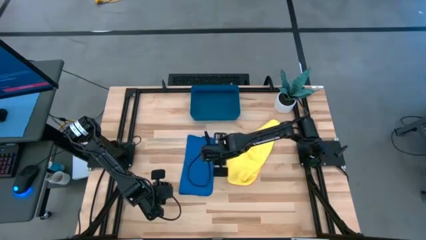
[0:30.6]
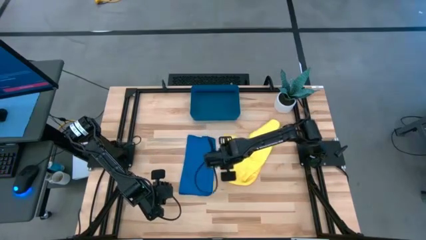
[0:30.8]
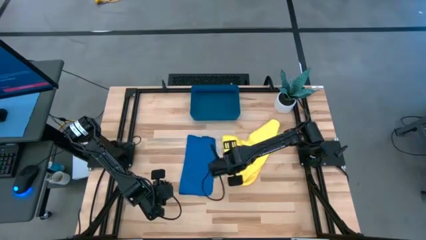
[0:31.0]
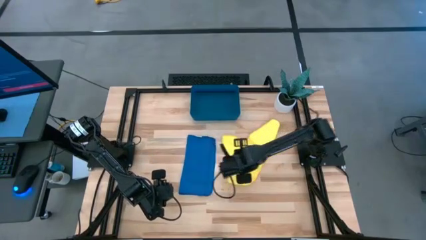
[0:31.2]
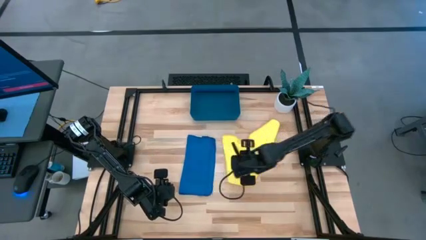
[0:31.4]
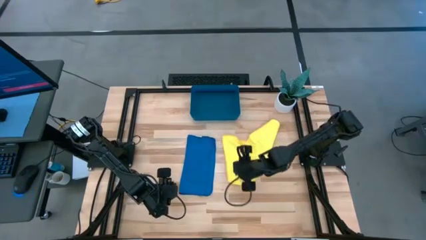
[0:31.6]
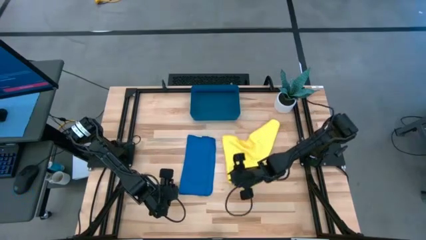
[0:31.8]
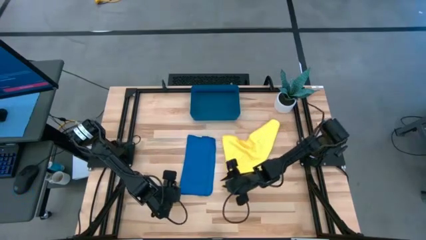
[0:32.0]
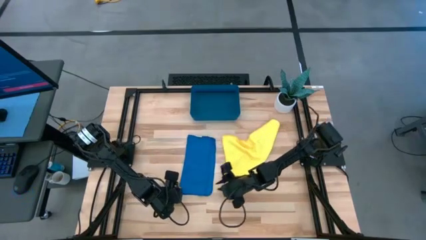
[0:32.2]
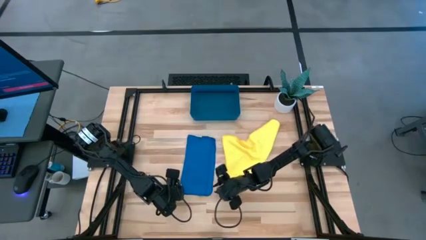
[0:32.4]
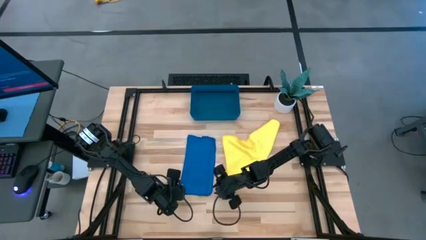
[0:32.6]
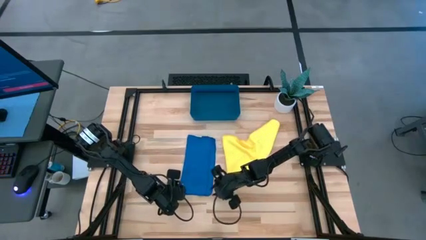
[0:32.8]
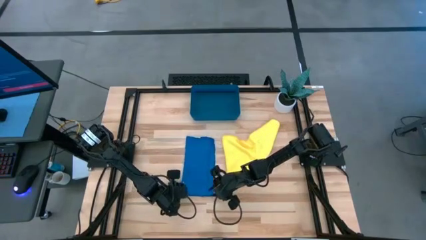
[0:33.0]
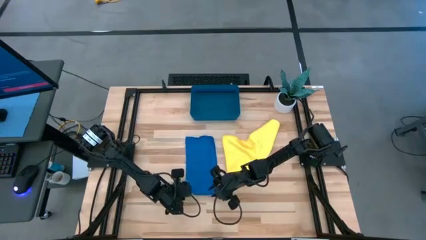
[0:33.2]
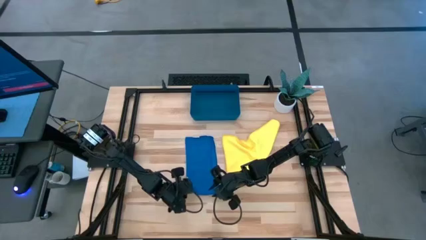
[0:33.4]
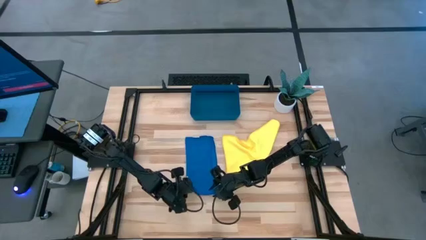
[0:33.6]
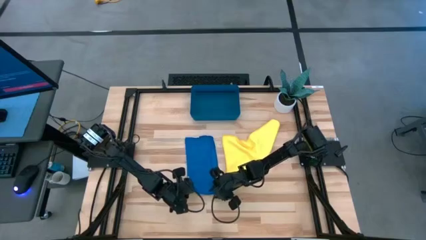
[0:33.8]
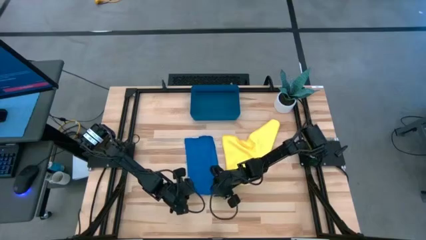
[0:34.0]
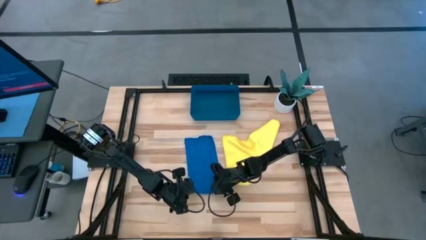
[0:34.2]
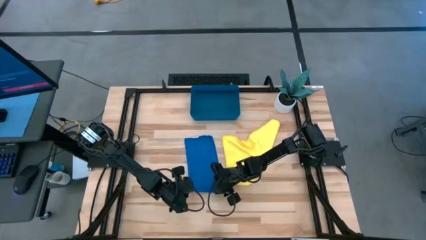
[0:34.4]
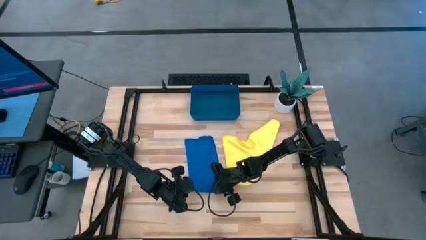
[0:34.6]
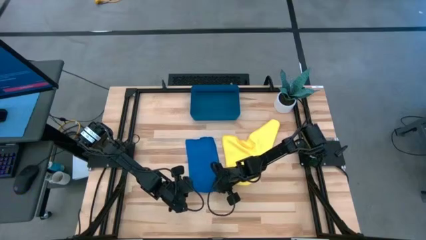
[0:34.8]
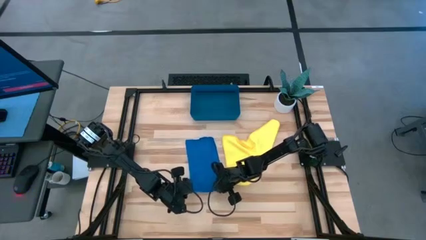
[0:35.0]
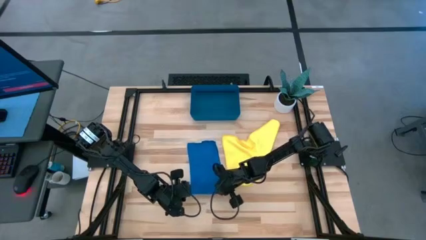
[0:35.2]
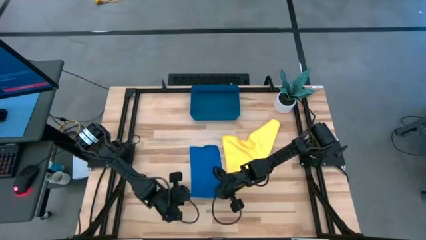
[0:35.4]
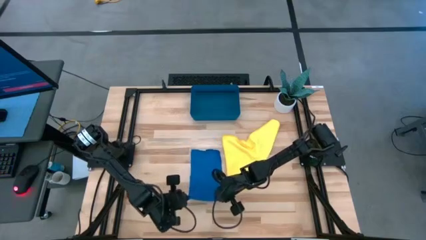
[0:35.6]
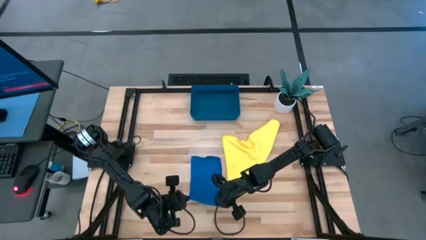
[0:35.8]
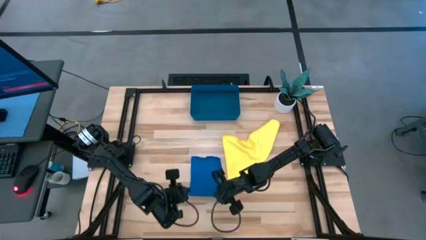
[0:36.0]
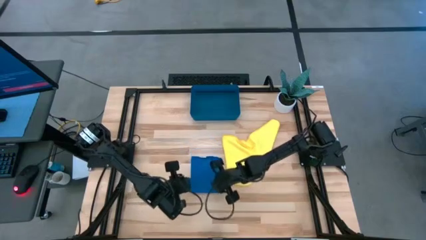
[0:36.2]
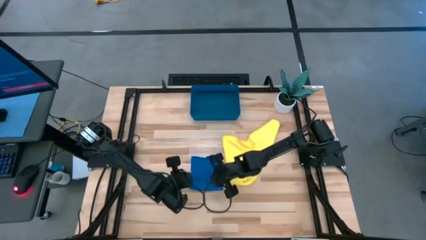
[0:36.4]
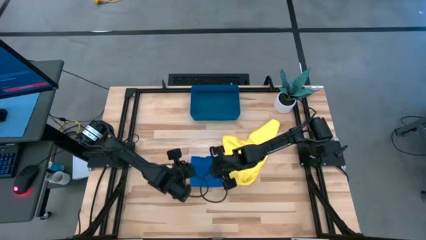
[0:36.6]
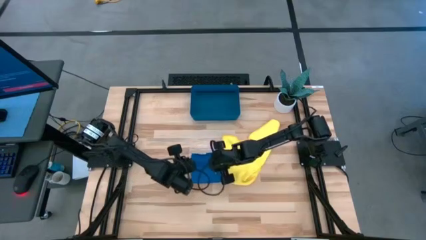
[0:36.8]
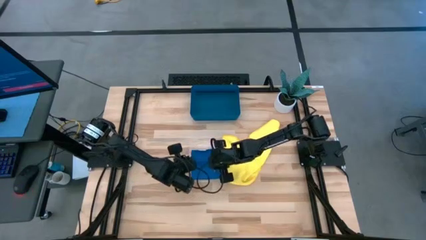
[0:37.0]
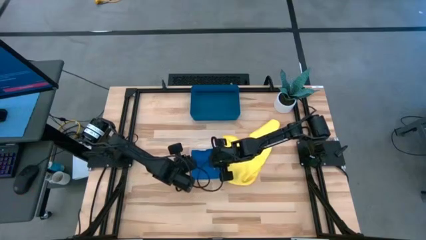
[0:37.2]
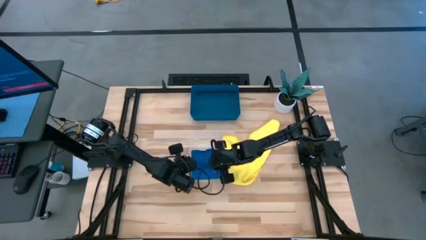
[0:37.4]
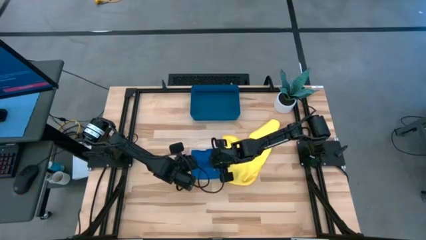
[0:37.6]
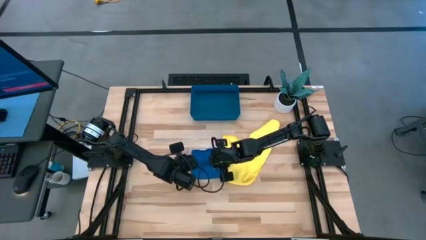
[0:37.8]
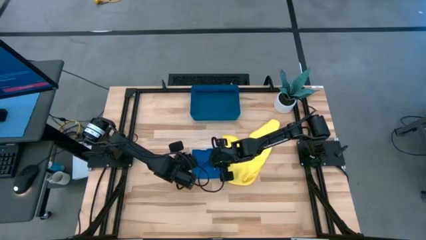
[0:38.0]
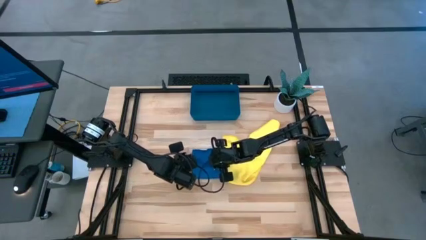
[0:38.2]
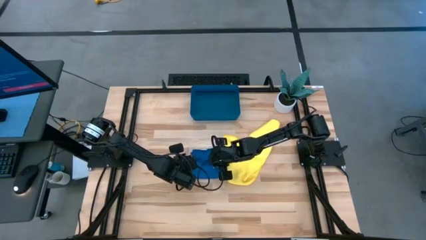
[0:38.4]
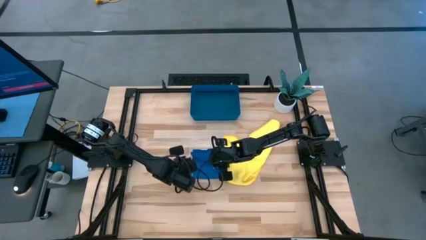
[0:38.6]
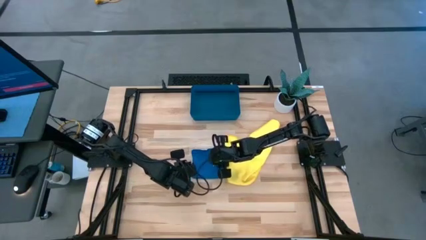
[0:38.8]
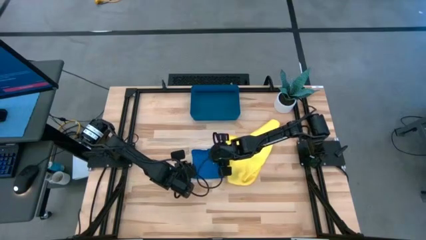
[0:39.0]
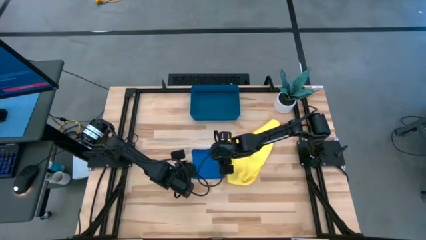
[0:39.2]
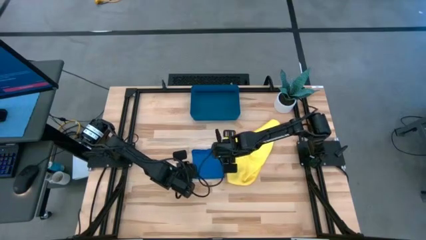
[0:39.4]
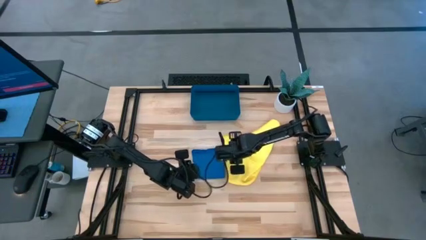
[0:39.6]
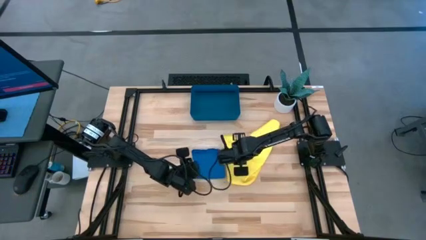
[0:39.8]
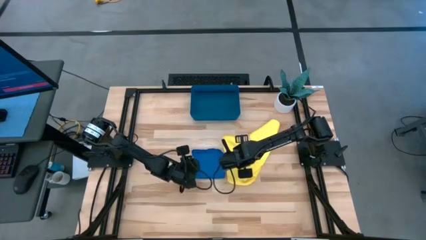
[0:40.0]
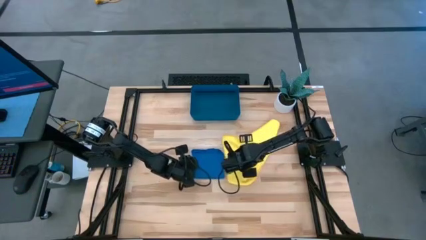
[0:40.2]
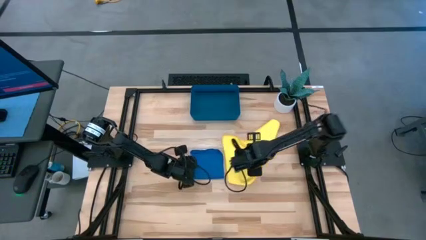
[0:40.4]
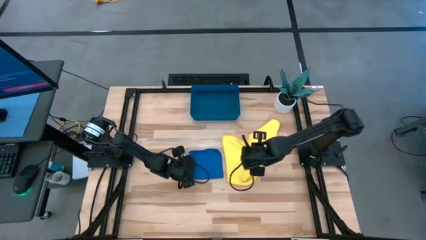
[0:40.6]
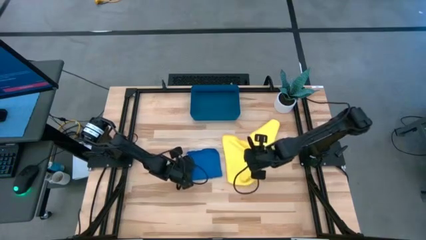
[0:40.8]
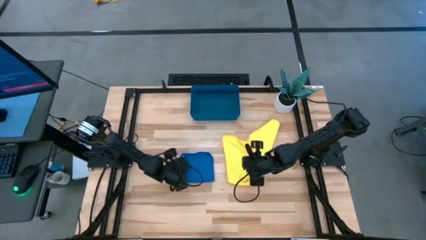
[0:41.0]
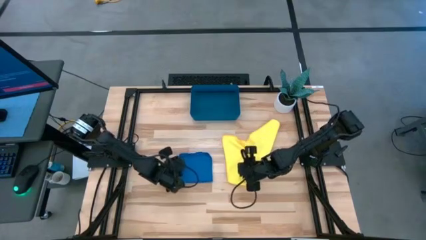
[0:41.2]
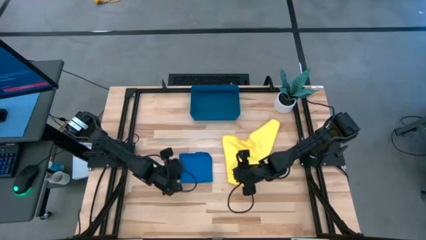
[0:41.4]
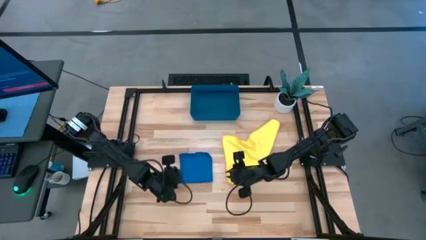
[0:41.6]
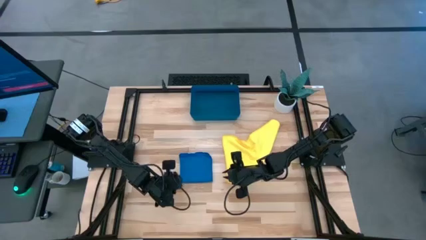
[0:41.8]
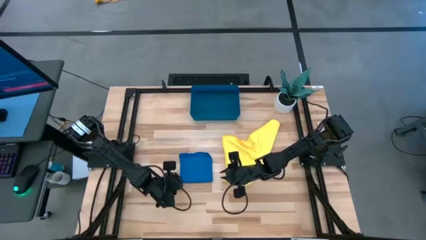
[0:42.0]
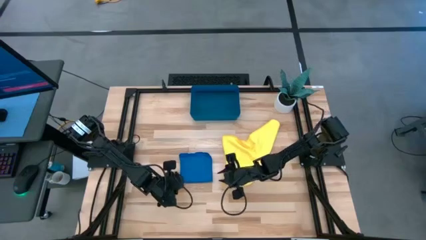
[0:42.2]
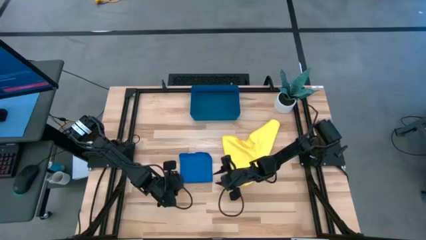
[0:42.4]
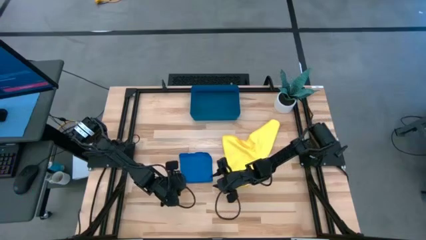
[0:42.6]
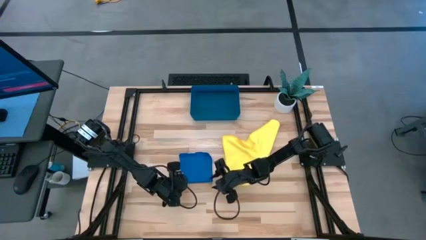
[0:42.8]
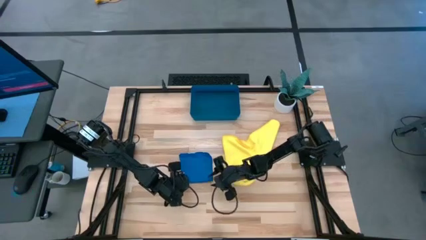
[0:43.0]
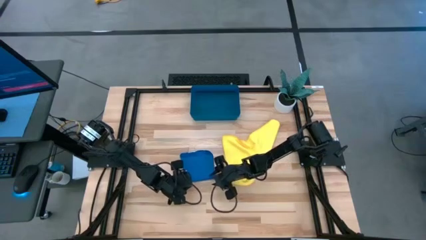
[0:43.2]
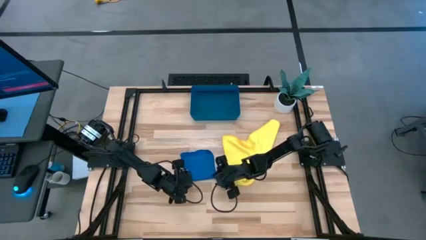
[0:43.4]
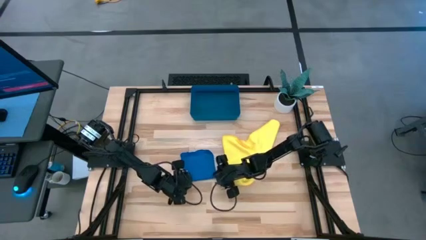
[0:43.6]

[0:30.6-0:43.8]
Task: Roll microfiber towels into tight, uniform cylinder then place into a basket
Fold the blue towel
